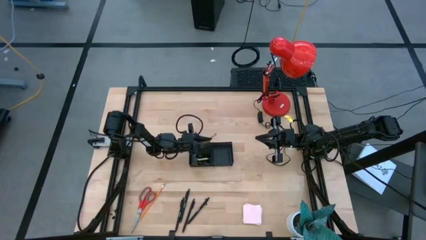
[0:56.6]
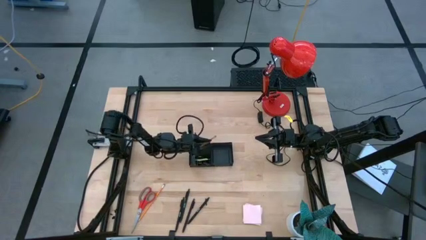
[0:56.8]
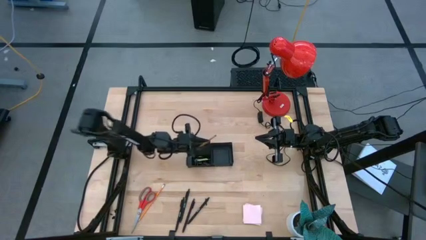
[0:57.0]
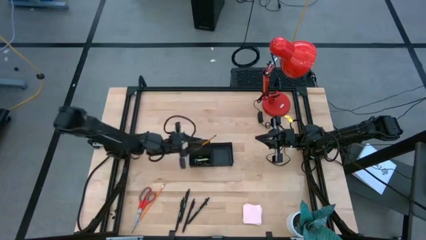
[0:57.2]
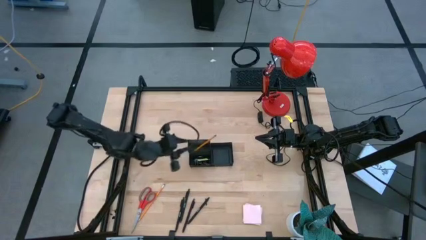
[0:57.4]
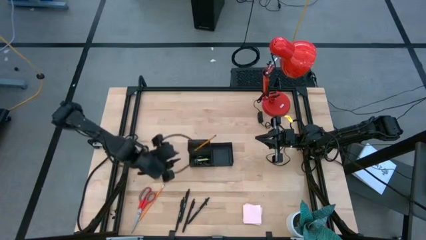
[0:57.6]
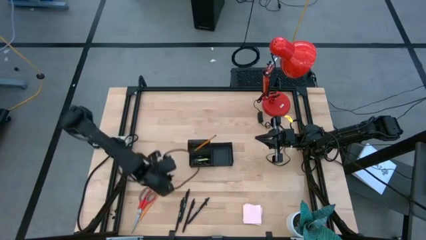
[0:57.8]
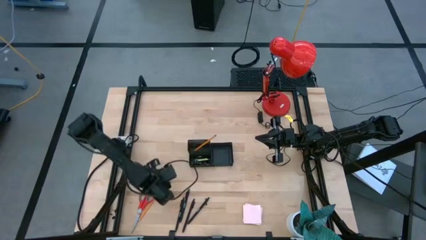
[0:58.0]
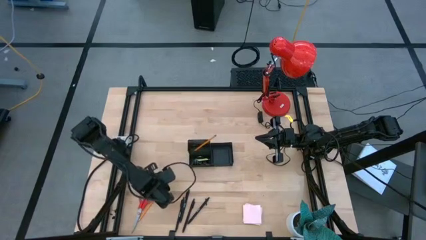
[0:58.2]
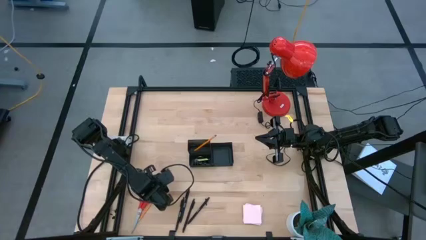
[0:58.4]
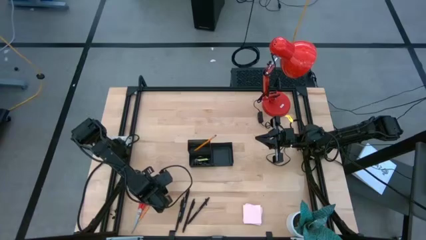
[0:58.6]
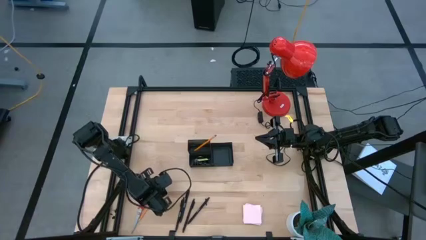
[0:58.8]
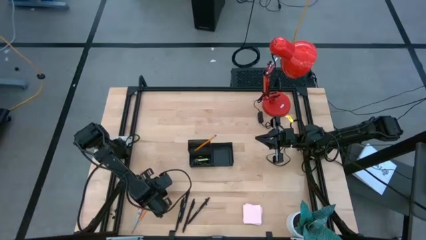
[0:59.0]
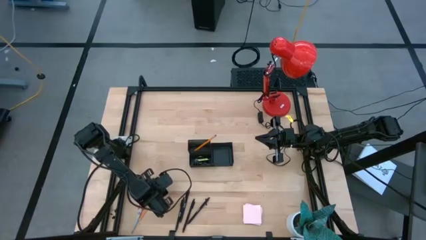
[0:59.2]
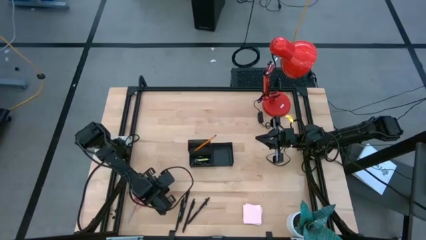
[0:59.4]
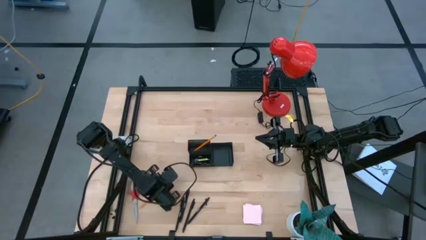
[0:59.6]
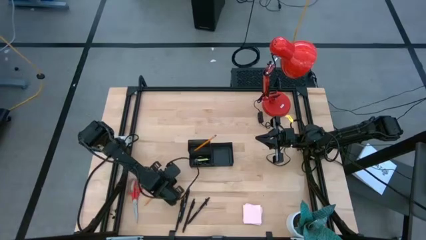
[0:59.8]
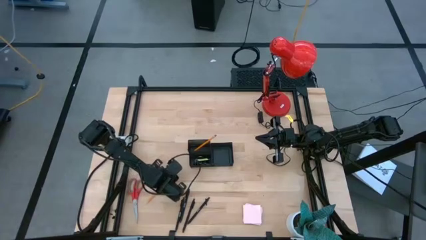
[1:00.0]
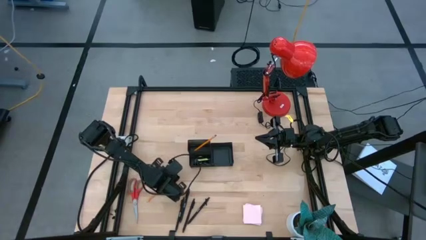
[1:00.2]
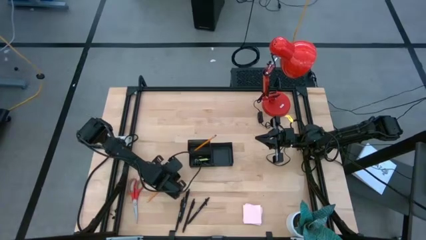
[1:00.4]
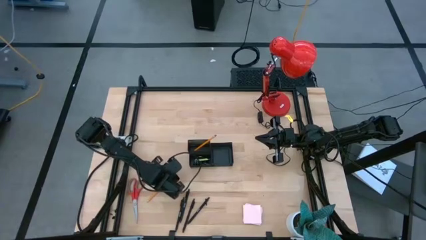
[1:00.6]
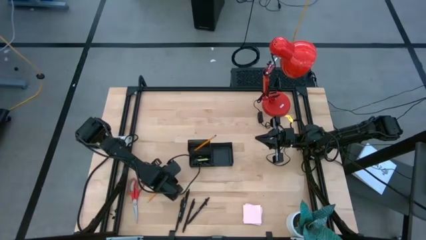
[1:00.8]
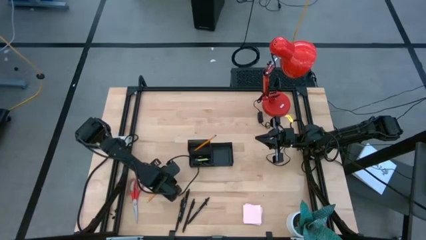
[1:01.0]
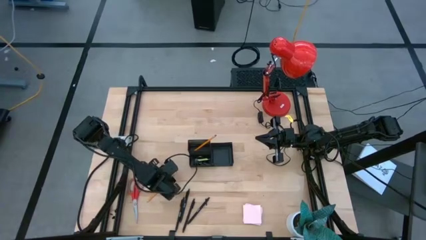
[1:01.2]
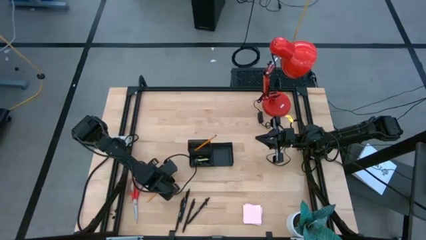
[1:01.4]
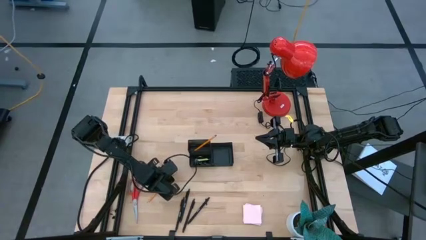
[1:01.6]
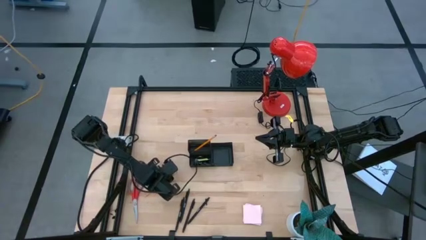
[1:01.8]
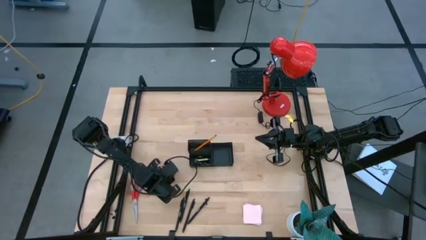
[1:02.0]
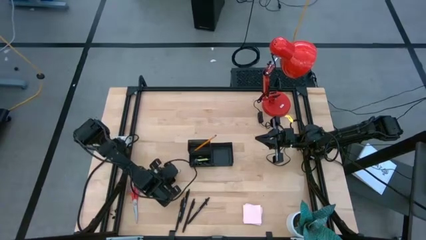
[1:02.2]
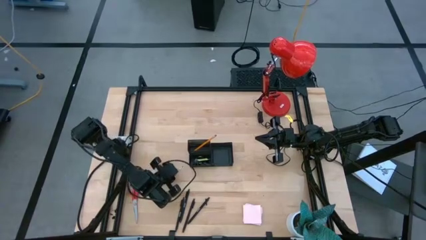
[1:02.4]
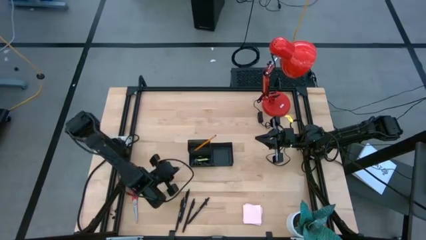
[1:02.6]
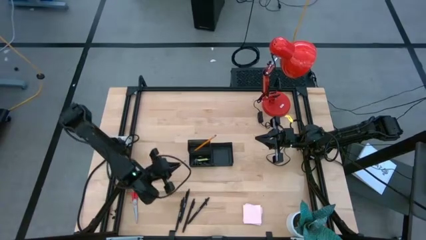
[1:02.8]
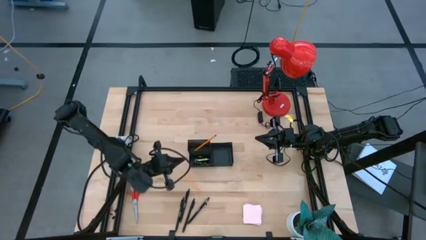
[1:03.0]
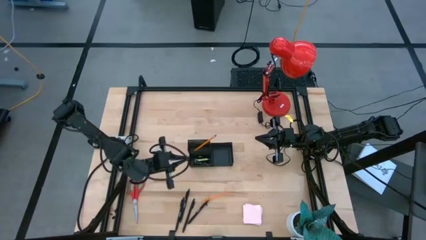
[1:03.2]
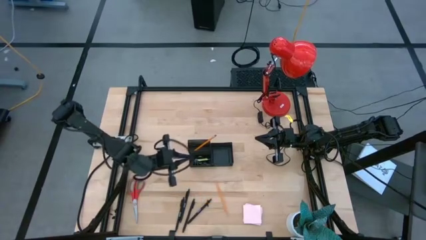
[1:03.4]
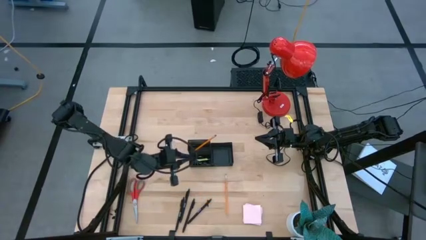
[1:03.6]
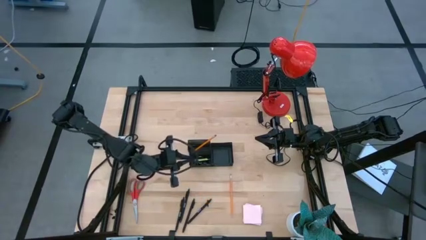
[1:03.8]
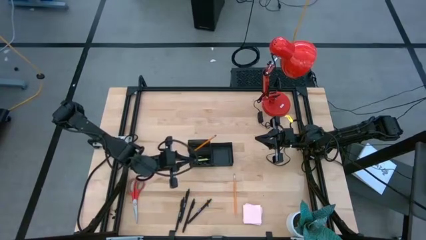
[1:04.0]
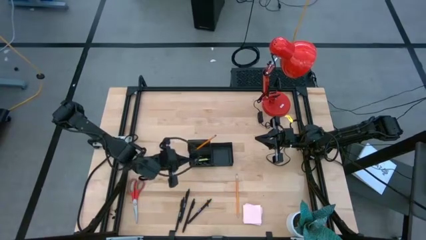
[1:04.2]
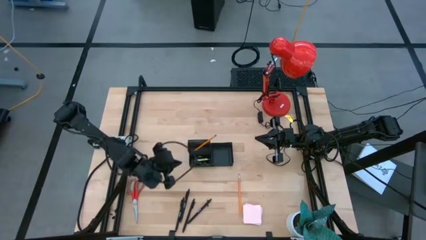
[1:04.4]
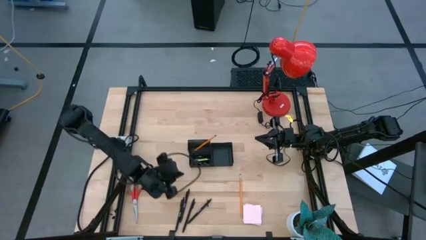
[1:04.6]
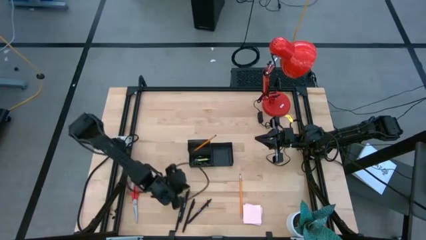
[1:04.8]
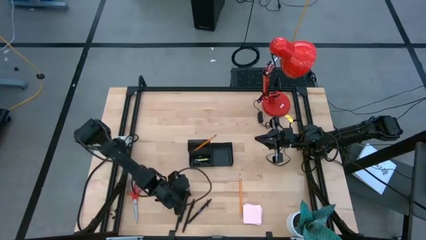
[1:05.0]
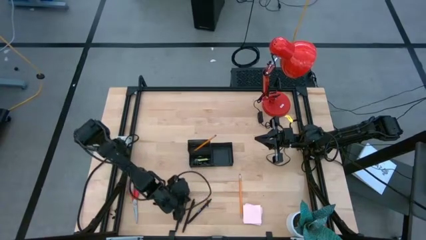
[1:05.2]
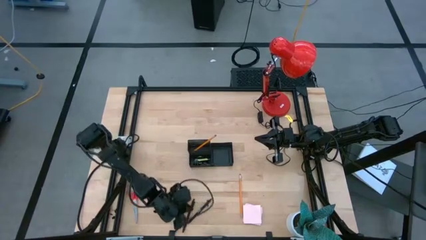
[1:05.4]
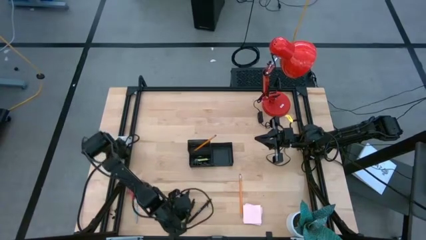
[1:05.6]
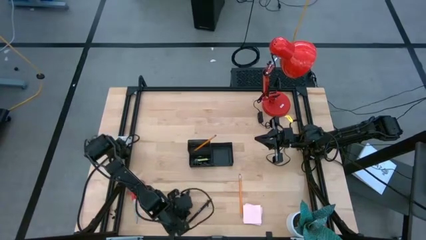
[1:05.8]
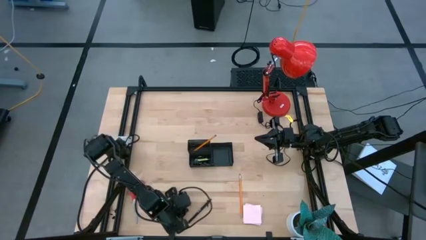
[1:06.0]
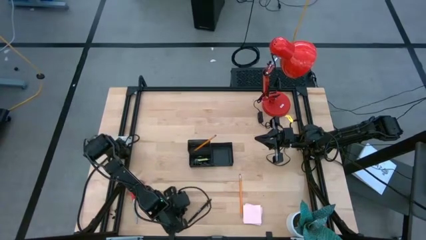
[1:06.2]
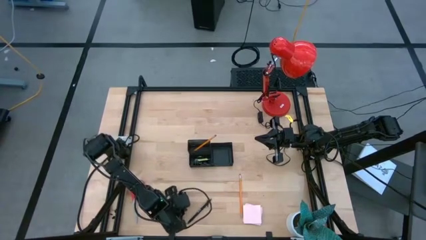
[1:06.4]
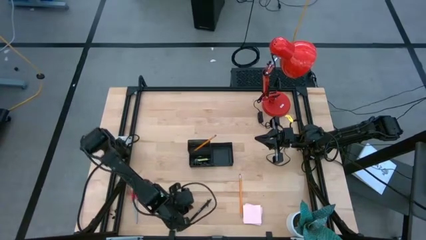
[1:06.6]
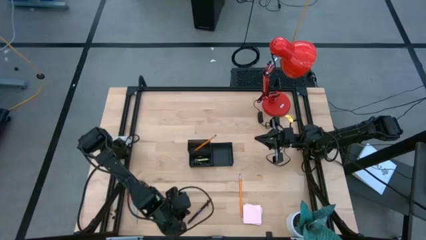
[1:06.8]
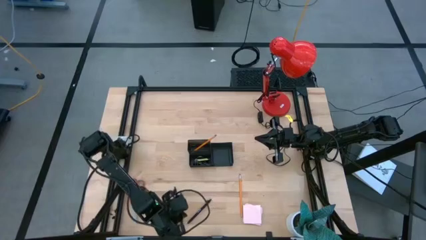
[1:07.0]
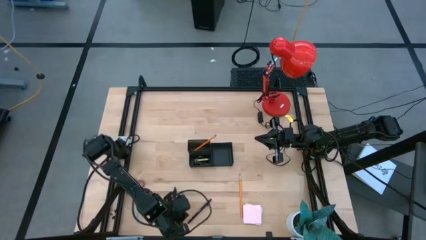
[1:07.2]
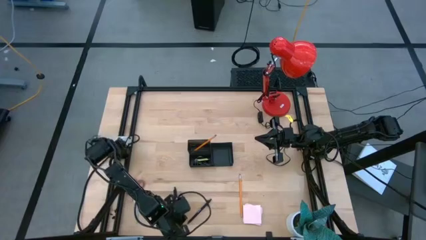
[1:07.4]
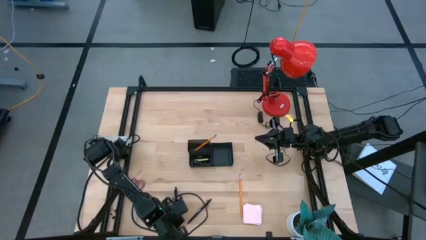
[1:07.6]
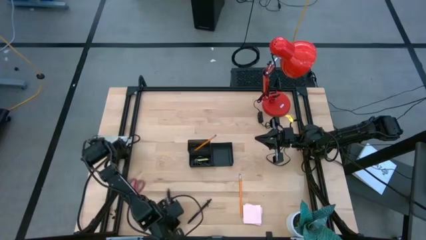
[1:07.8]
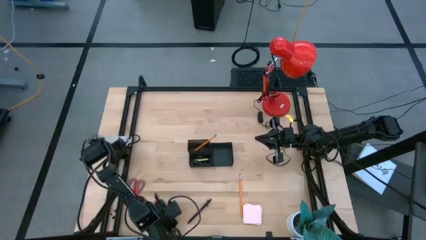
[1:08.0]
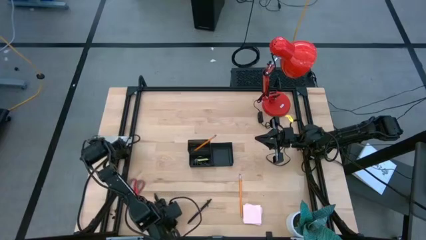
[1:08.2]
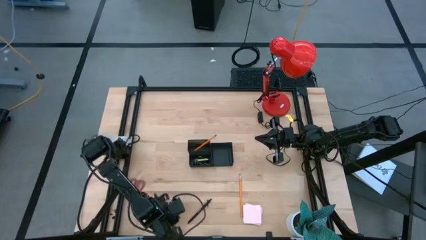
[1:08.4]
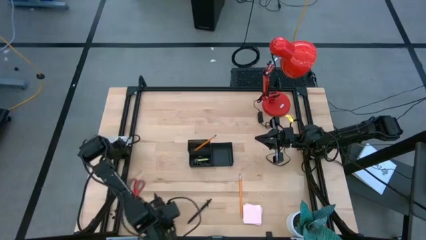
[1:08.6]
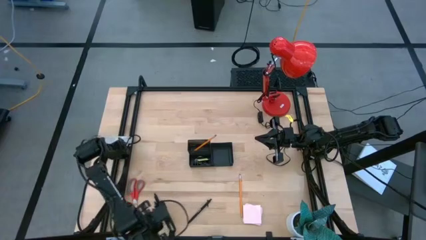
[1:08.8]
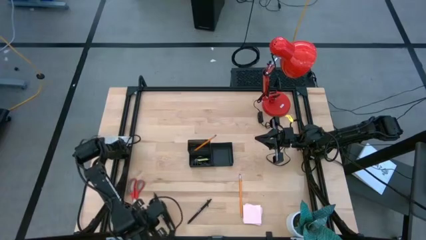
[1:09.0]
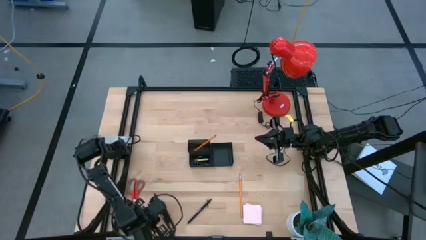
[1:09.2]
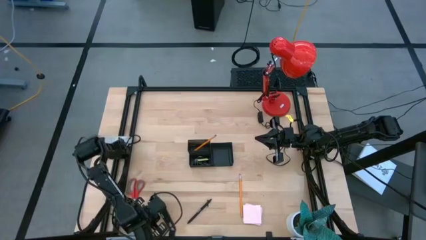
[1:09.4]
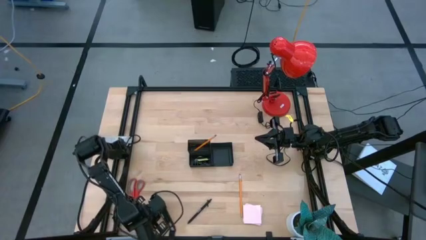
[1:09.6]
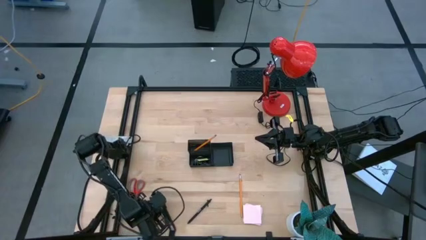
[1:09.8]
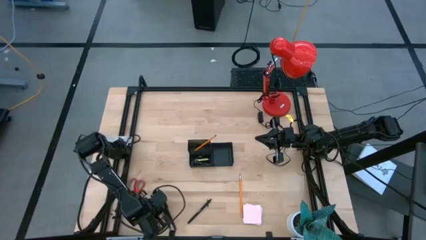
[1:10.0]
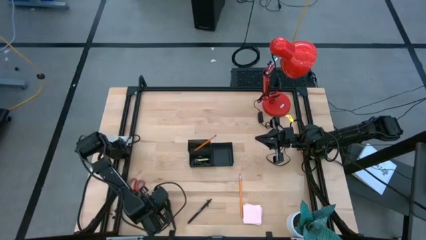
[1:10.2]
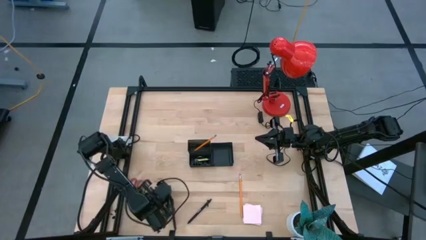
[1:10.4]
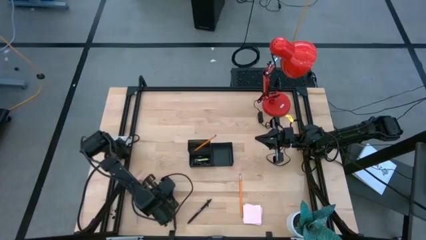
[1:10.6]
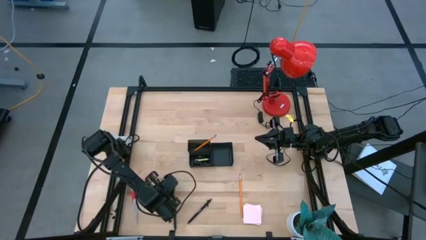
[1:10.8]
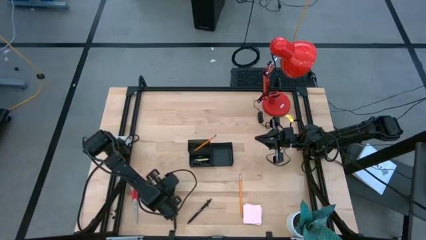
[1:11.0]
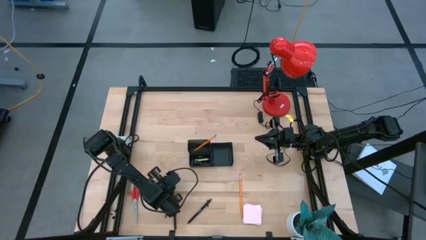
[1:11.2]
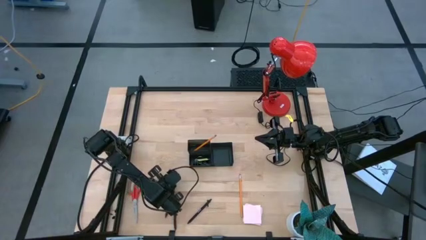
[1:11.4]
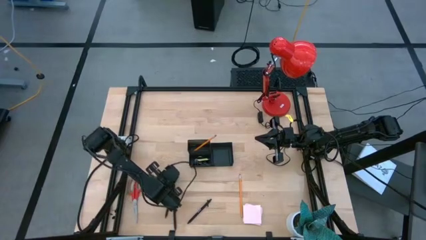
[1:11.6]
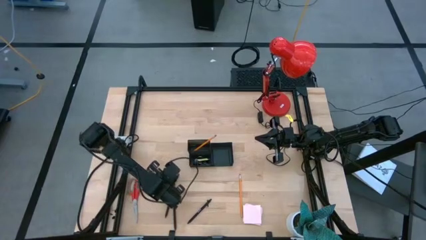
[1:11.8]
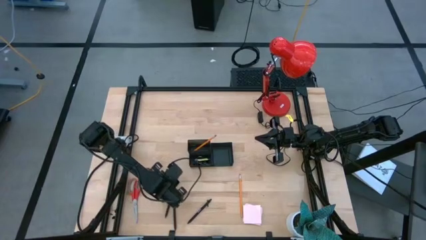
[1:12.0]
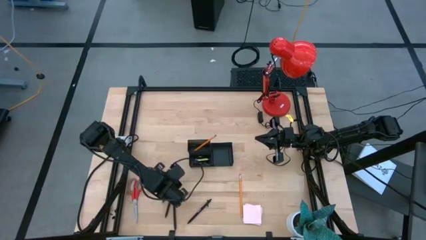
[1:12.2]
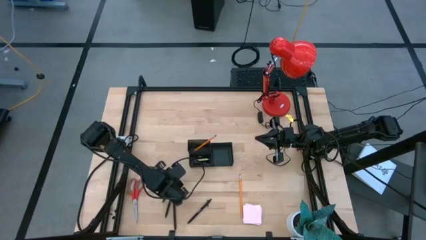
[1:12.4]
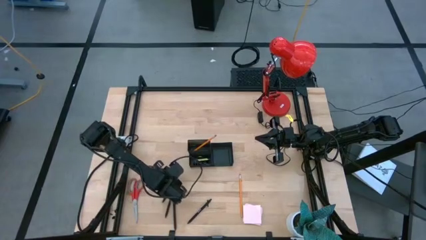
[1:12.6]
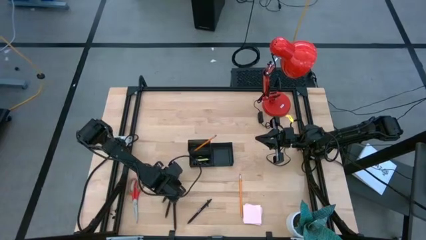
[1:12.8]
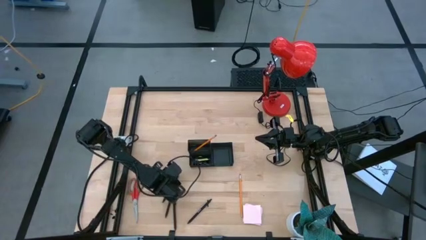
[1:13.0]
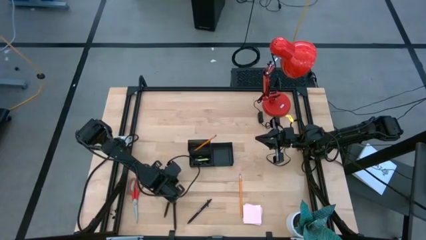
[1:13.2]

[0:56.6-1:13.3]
Task: Pick and place office supplies into organizer
Put the pencil into the mesh desk organizer
